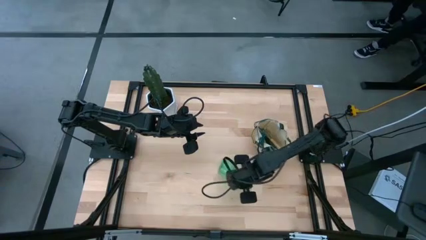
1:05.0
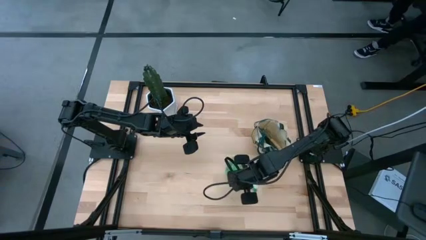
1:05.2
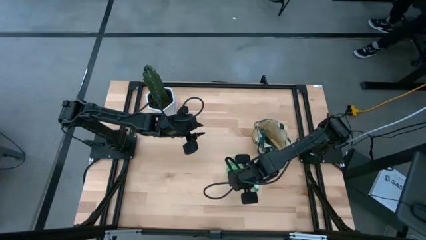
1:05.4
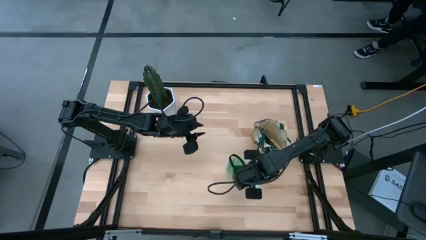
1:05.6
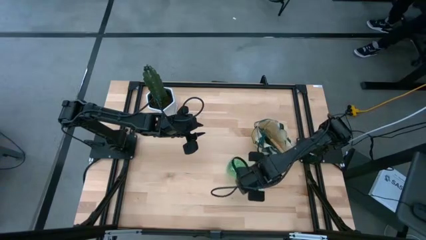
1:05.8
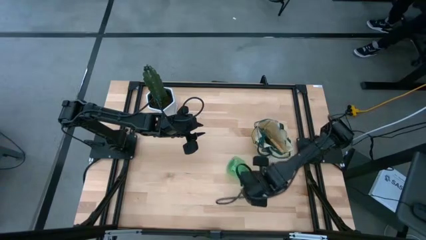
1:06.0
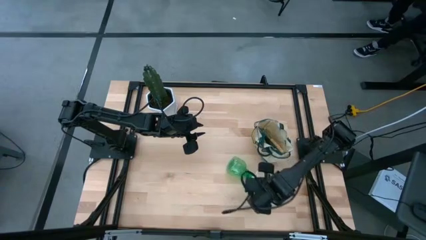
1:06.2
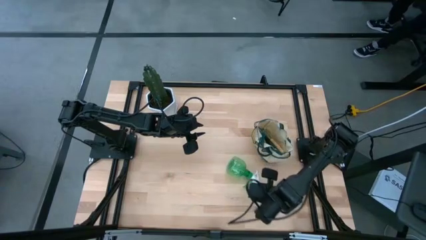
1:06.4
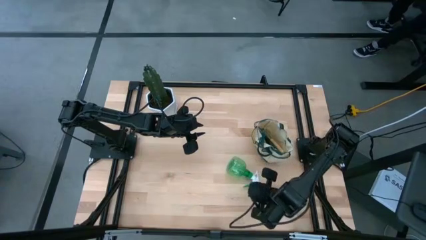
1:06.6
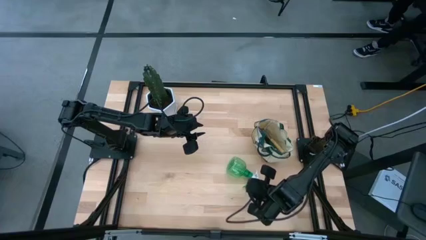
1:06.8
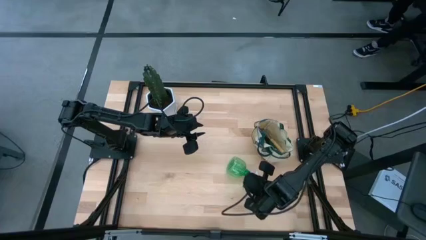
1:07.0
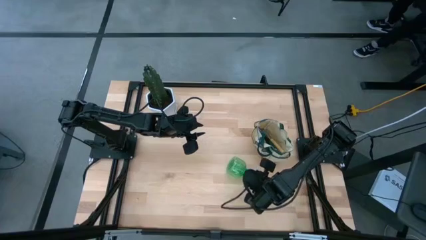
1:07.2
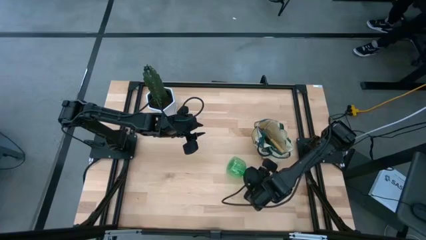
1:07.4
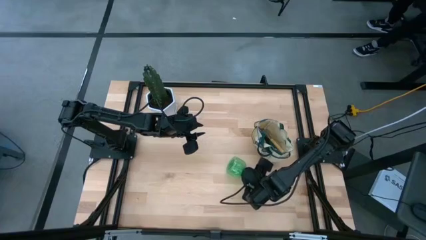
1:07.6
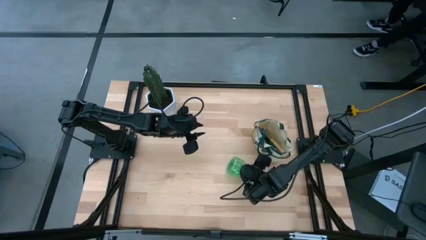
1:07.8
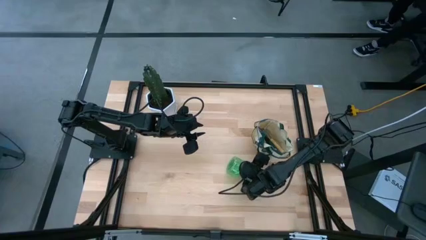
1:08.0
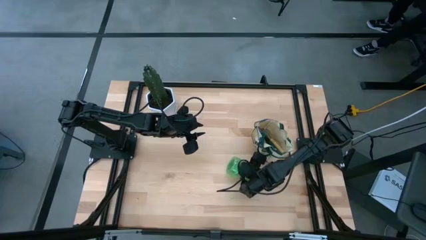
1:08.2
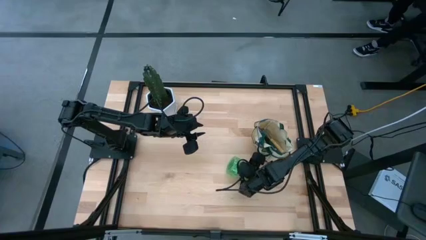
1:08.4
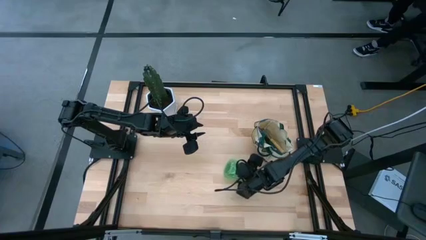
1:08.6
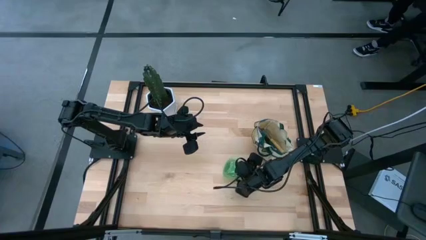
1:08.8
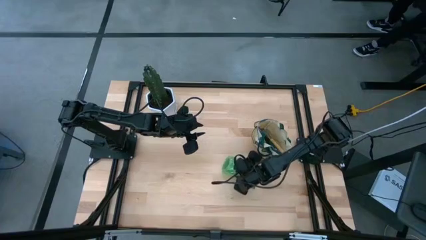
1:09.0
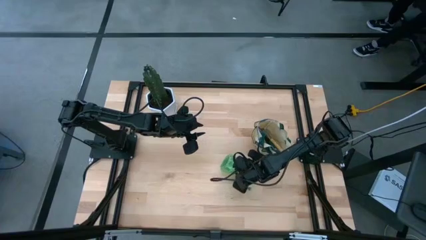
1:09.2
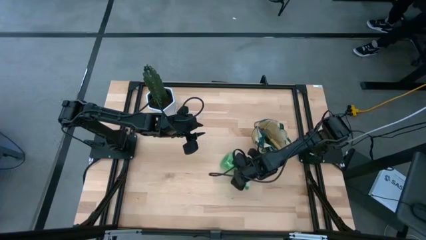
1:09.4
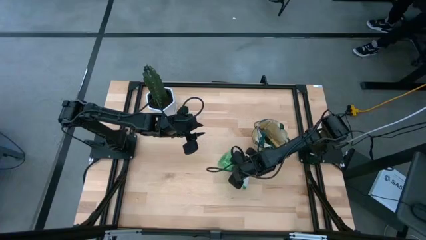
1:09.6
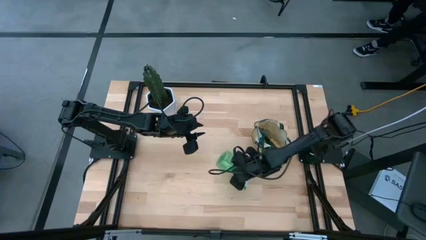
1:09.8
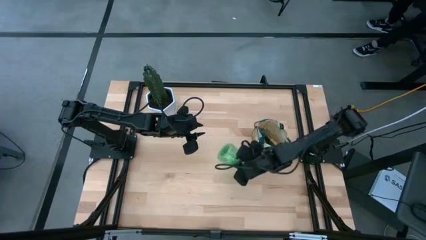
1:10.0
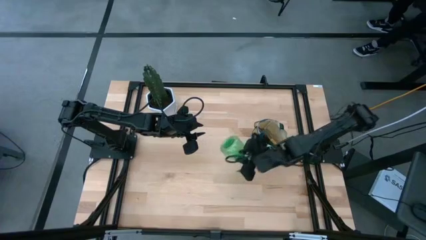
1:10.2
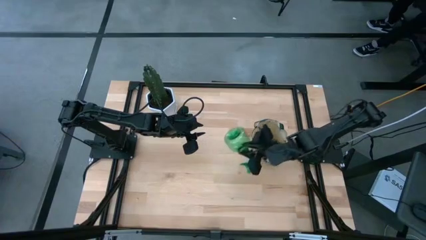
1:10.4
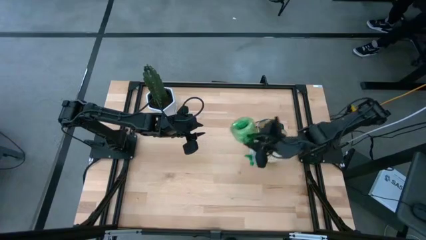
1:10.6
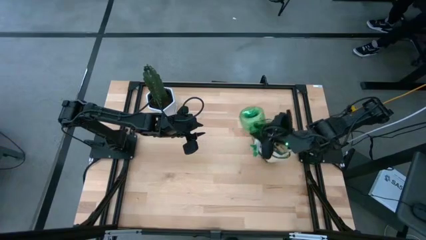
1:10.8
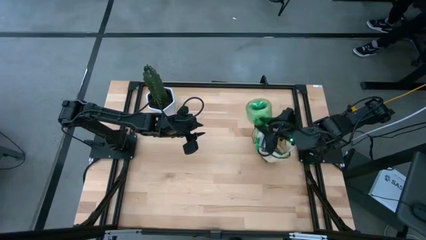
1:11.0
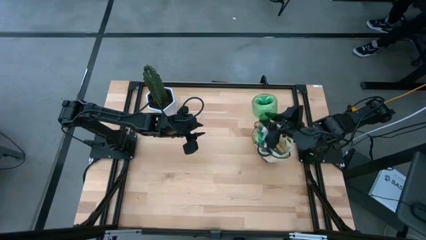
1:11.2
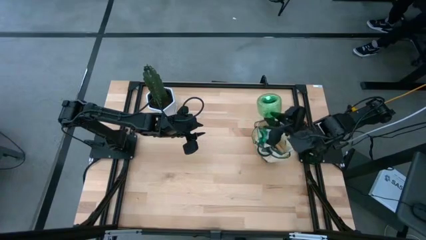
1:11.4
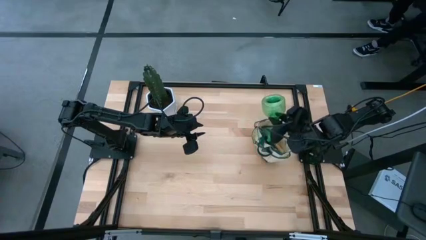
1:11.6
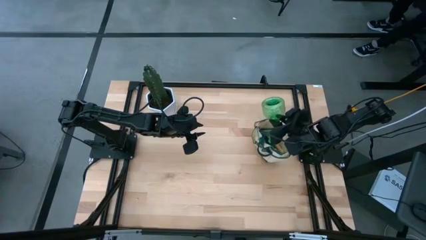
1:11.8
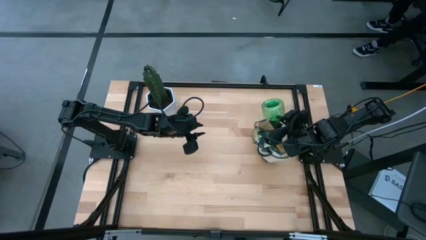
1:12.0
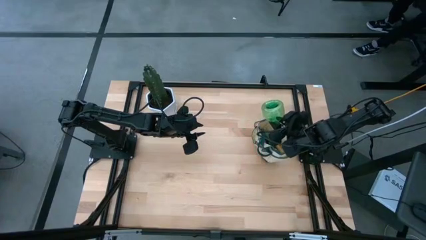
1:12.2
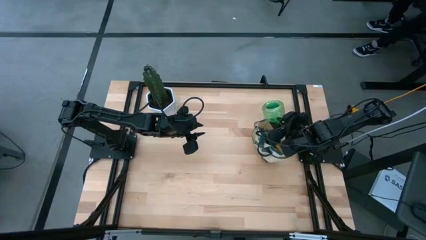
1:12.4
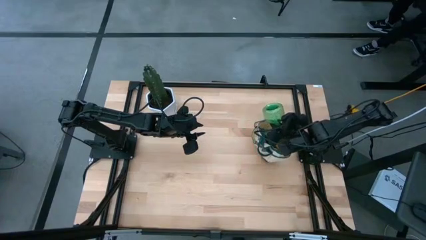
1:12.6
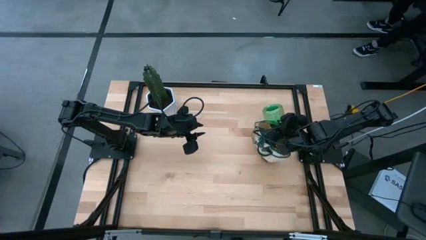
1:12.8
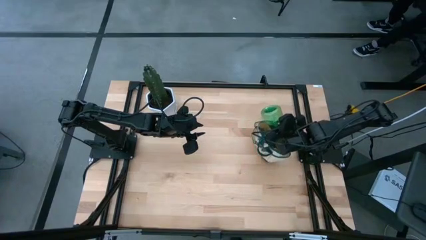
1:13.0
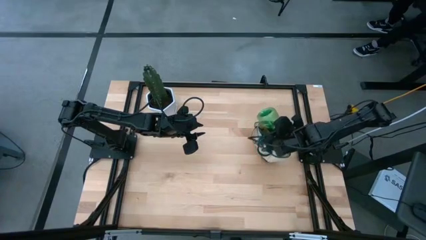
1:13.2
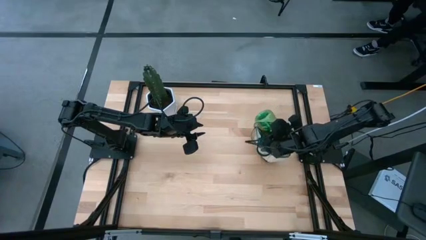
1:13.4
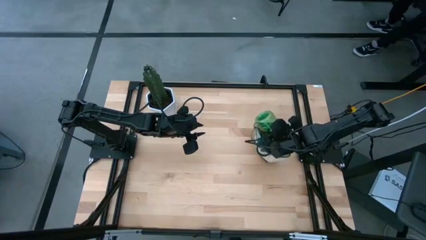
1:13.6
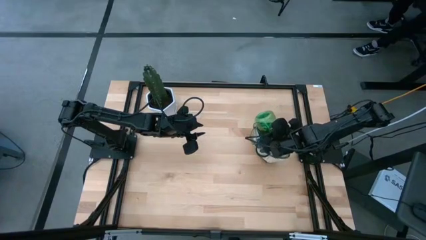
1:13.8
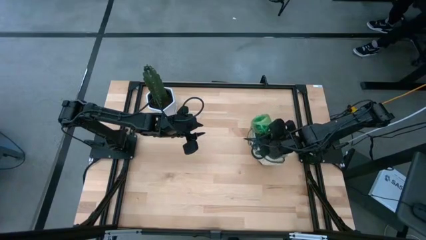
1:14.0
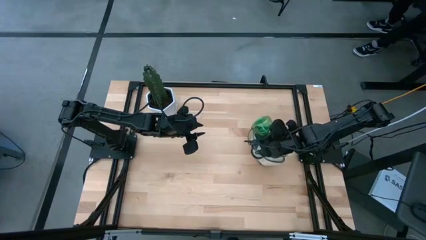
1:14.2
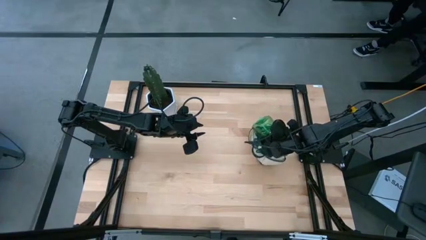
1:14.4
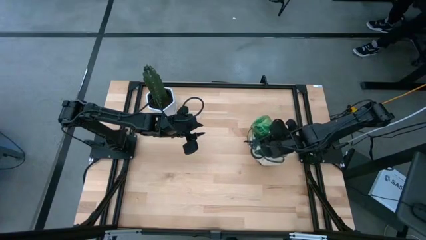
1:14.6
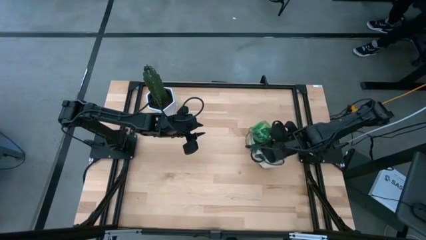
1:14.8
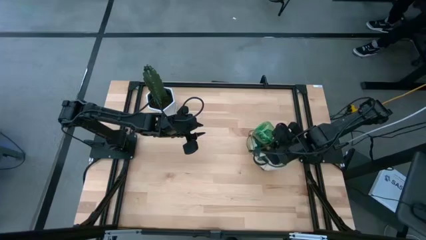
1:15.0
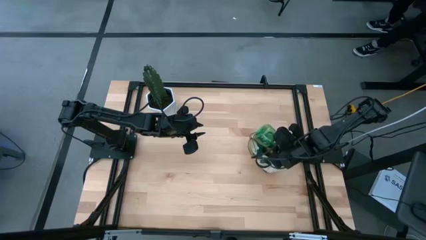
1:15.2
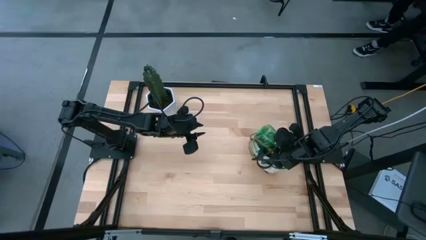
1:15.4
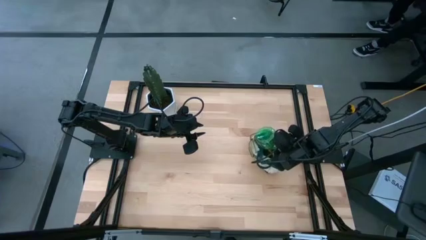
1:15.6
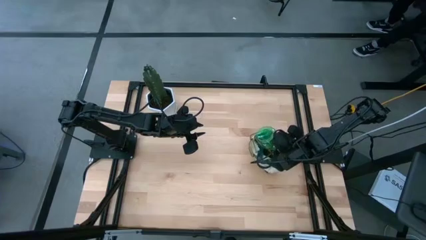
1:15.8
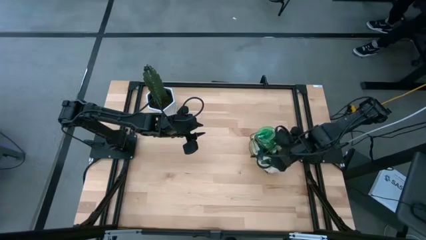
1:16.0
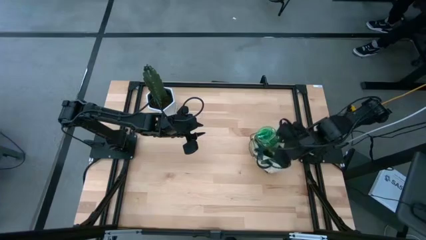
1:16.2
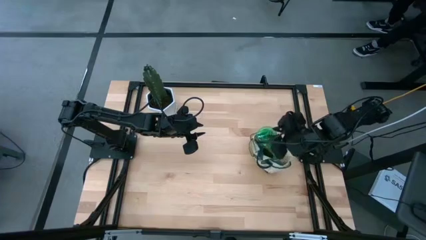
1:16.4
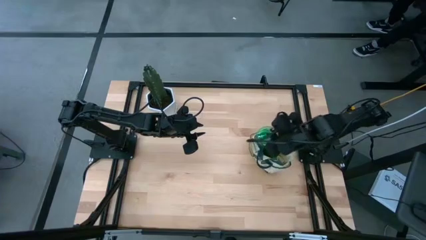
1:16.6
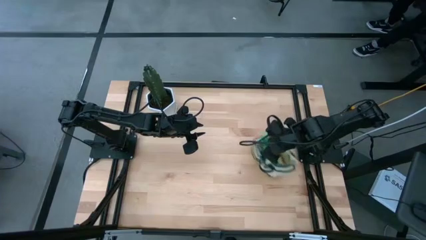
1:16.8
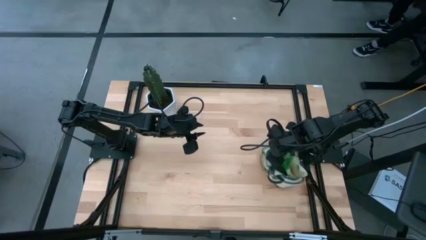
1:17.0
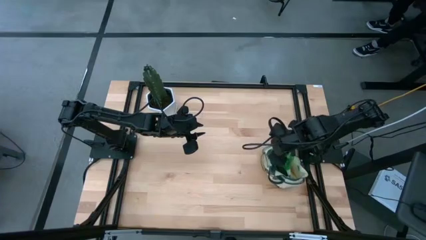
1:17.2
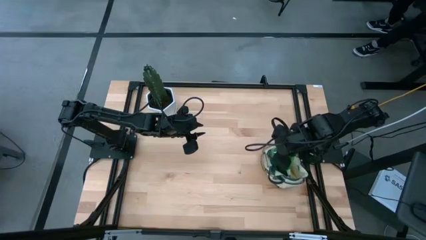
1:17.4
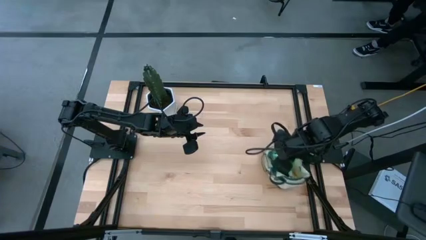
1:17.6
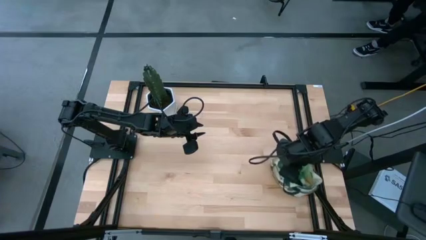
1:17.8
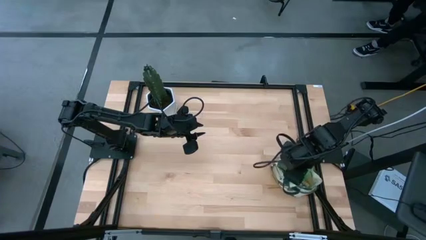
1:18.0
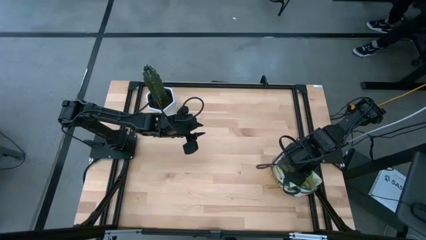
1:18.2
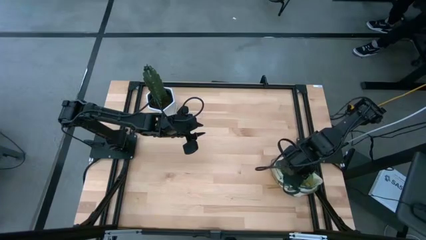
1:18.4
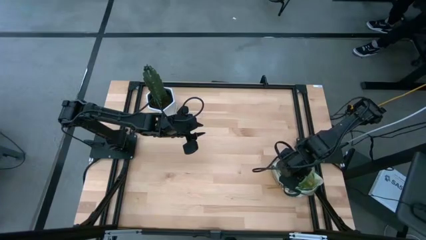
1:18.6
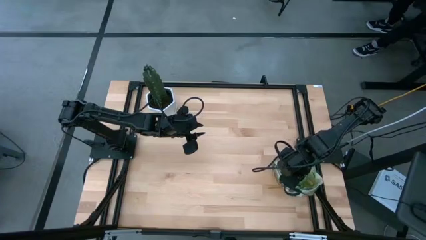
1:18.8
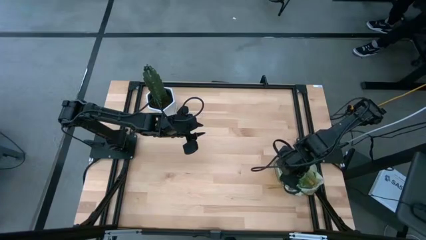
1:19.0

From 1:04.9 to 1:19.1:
Task: Pick & Place Garden tools in Gardening bag
Put the green spray bottle into the gardening bag
